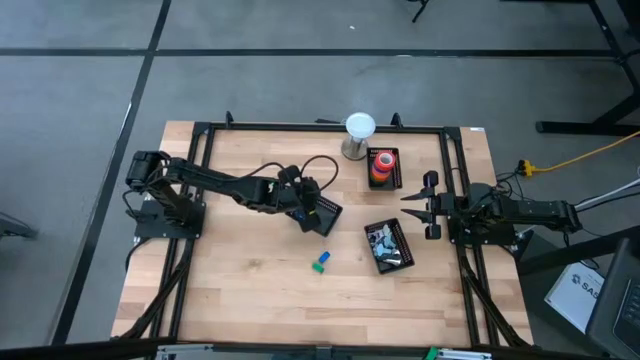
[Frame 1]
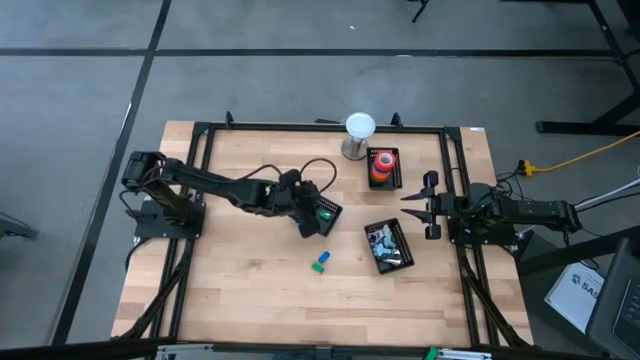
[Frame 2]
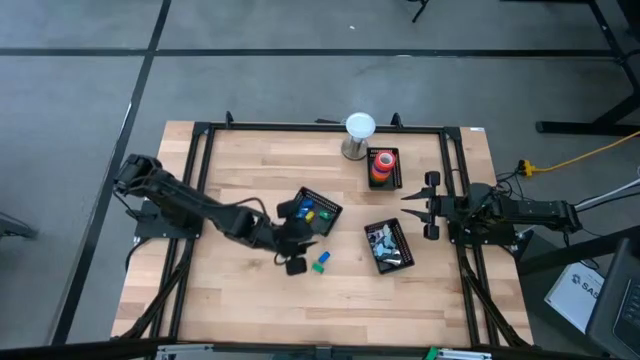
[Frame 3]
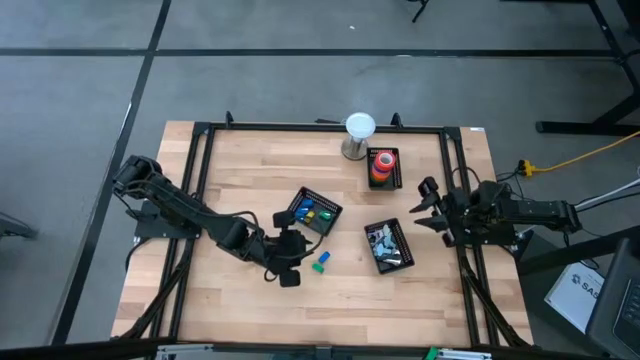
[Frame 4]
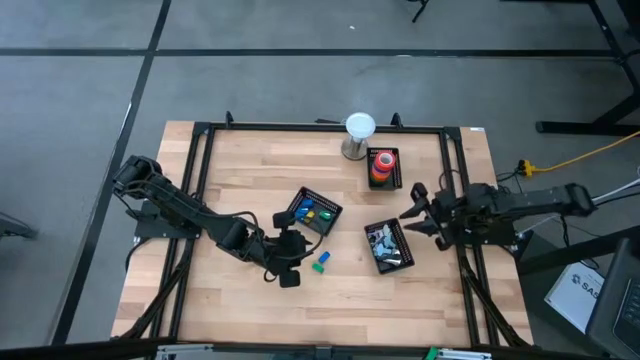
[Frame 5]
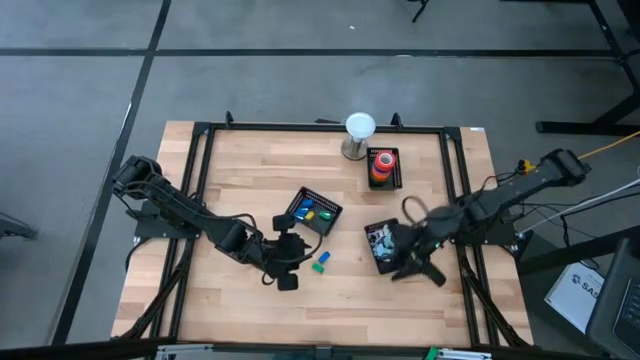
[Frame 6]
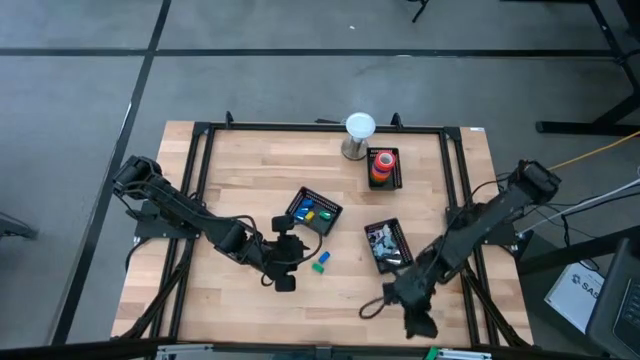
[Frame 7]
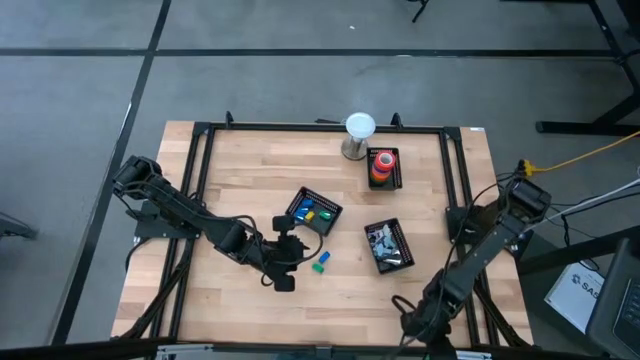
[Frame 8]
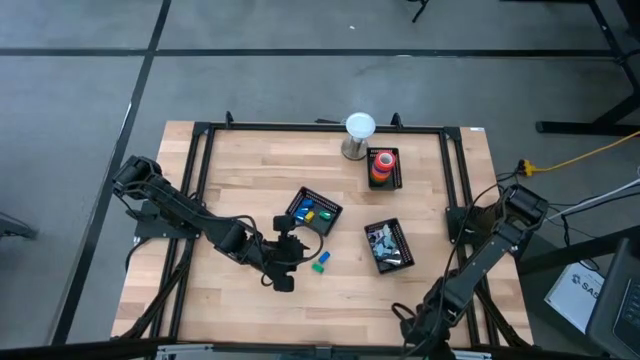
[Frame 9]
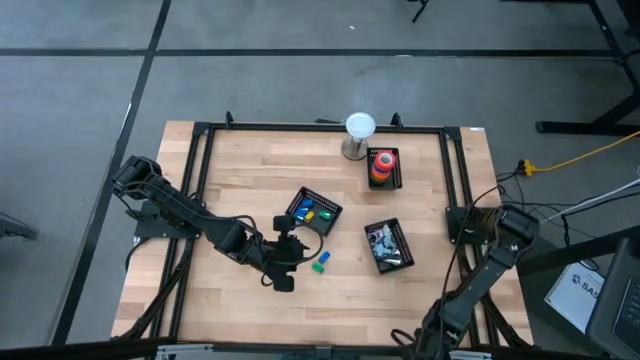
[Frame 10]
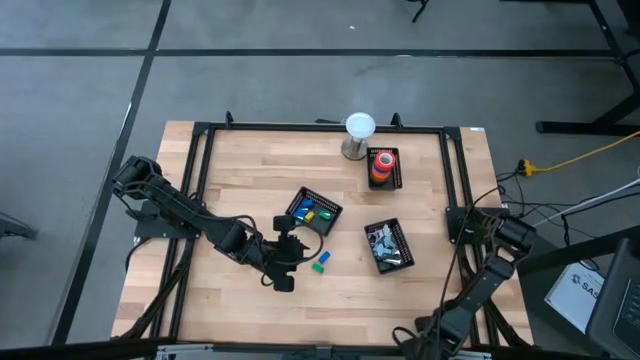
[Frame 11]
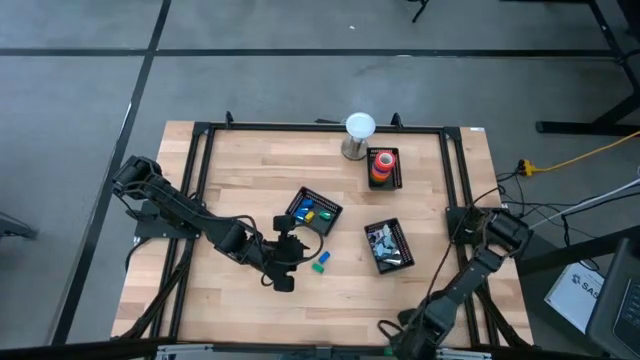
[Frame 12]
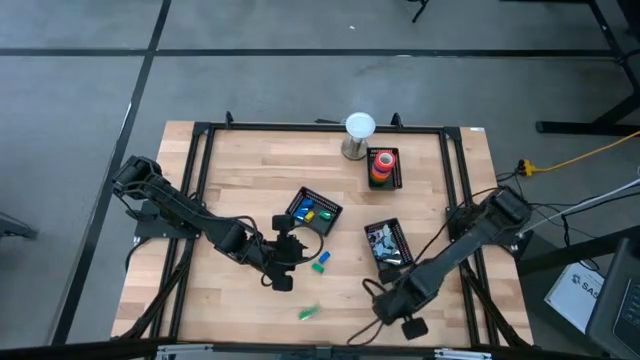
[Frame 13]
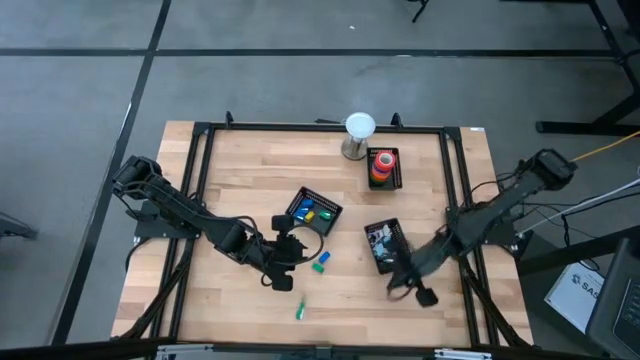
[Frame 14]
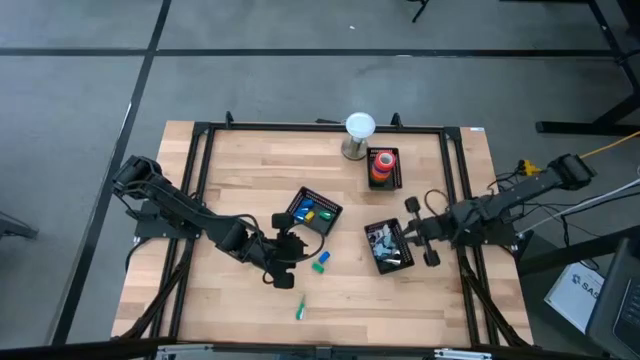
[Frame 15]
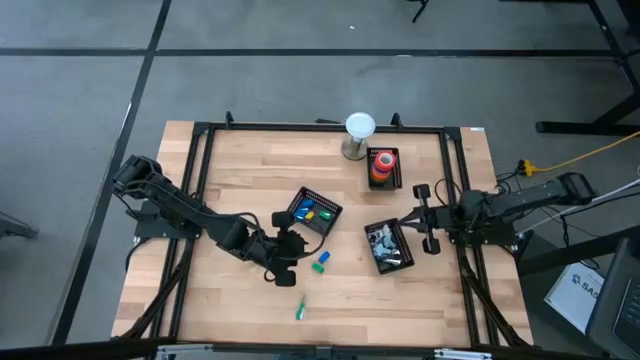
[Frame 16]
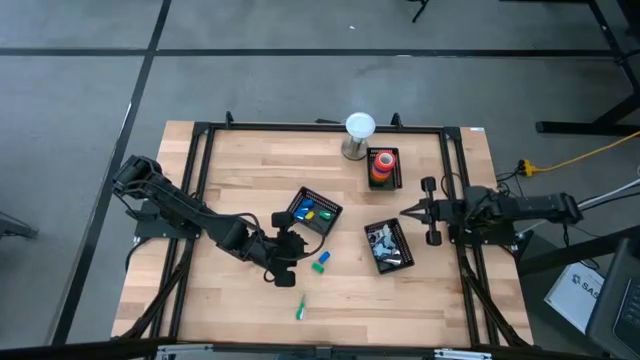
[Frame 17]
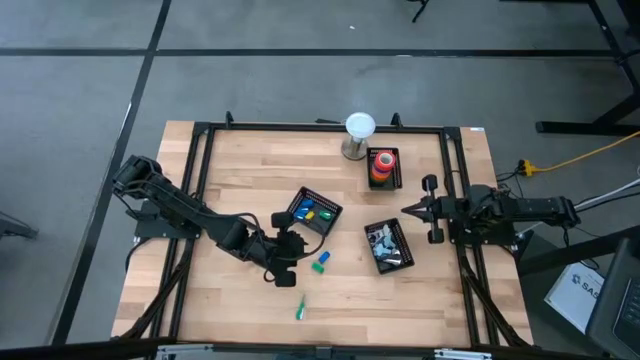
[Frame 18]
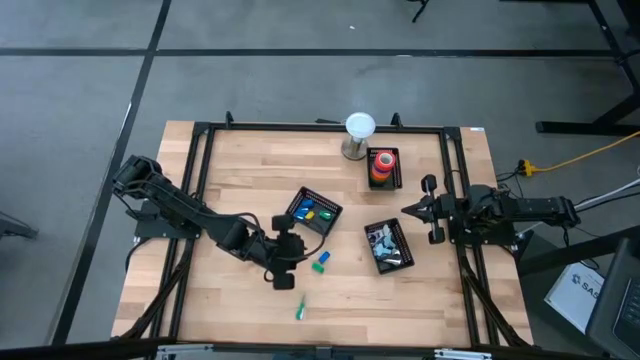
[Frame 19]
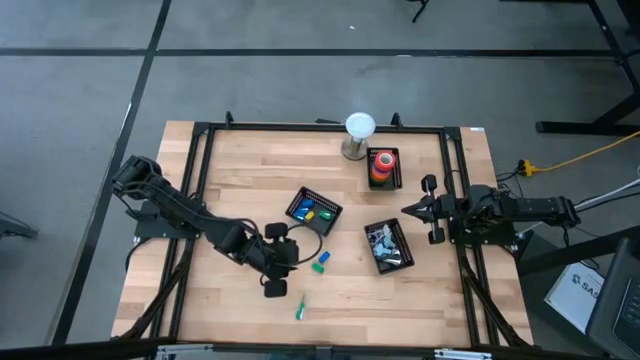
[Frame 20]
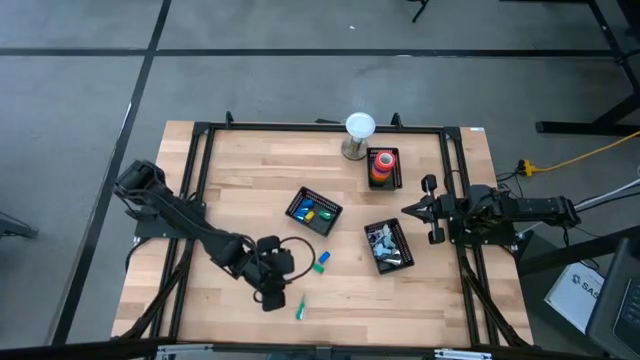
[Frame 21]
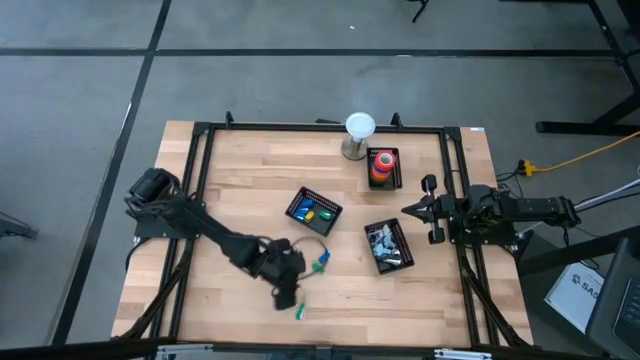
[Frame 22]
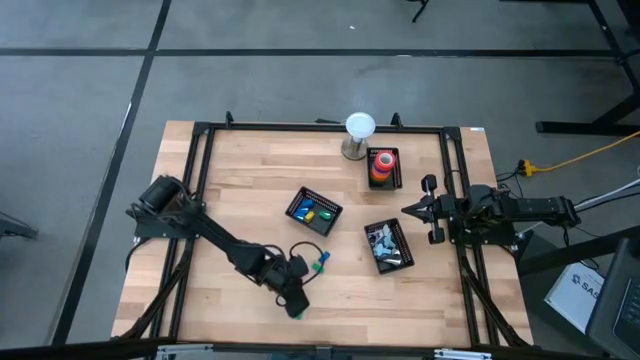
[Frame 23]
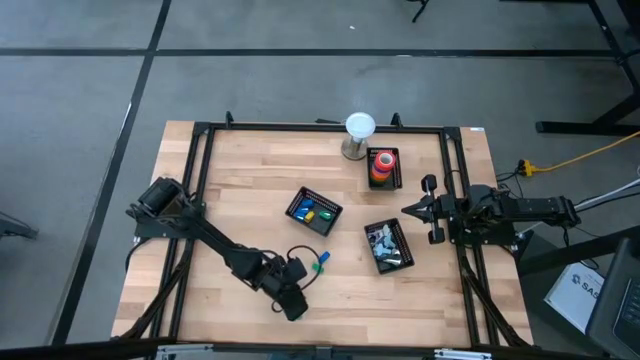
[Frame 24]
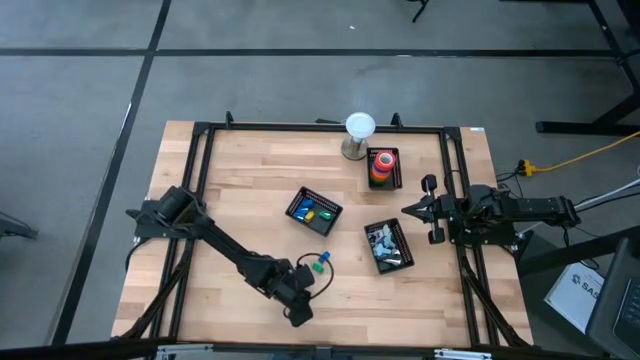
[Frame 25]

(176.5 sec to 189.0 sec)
Task: Pick and place Stapler, Stapler remover, tape
Put the green stapler into the center black bin

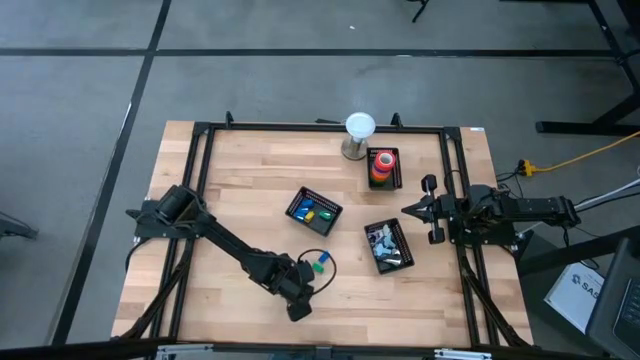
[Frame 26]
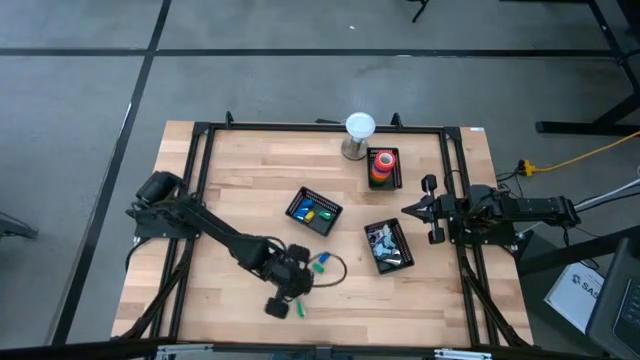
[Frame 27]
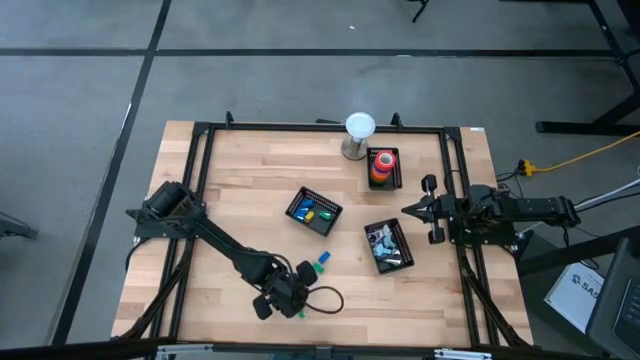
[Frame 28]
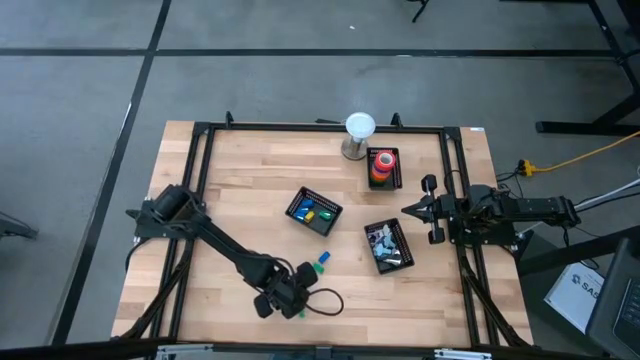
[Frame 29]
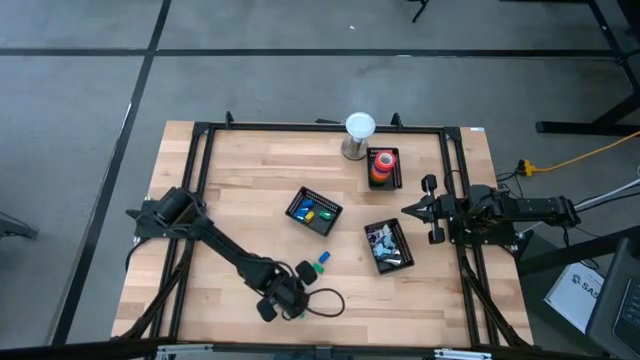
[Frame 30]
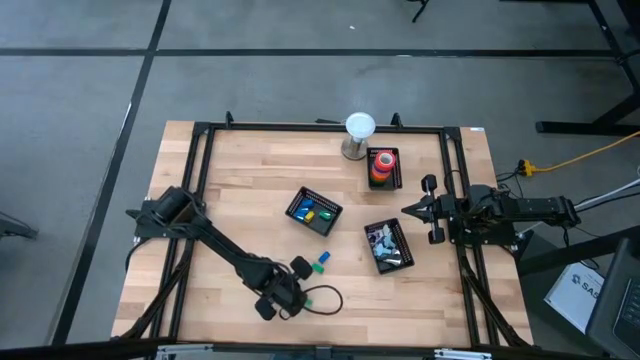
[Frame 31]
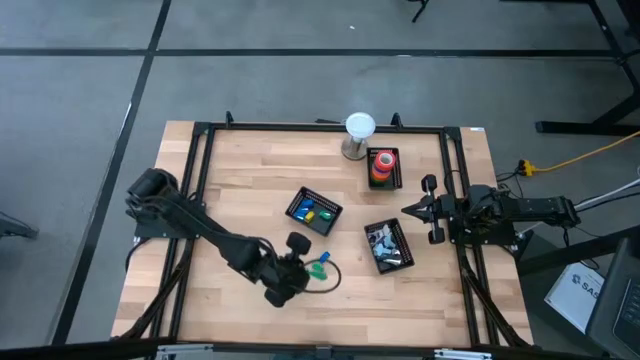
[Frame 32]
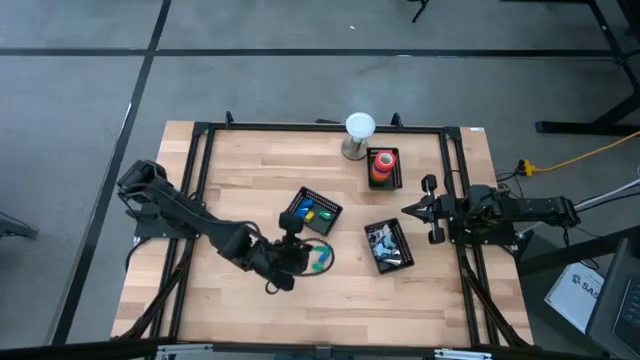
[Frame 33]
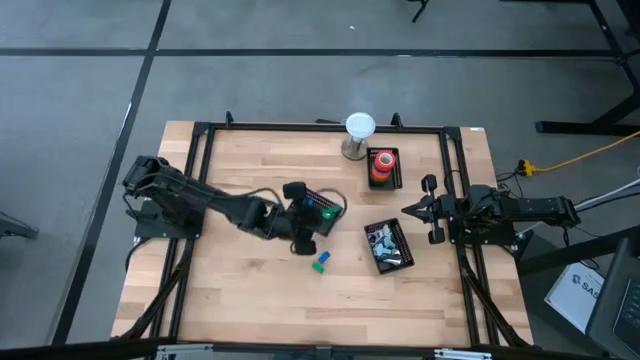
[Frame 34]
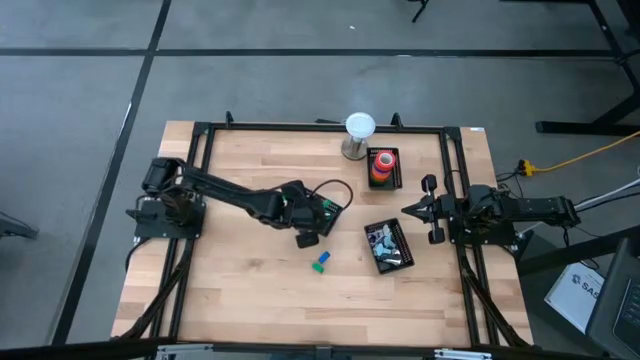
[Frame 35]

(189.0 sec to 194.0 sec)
Put the green stapler into the center black bin

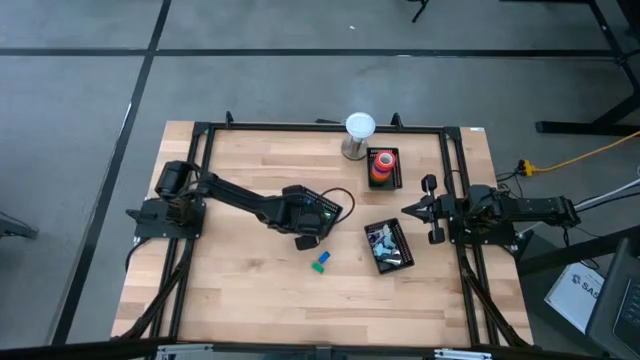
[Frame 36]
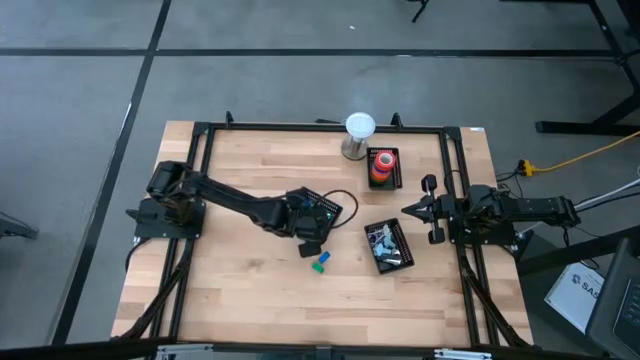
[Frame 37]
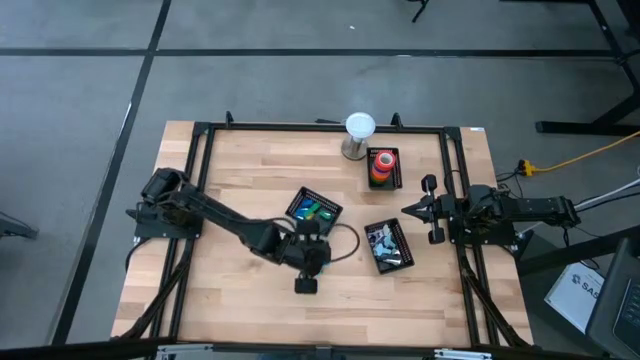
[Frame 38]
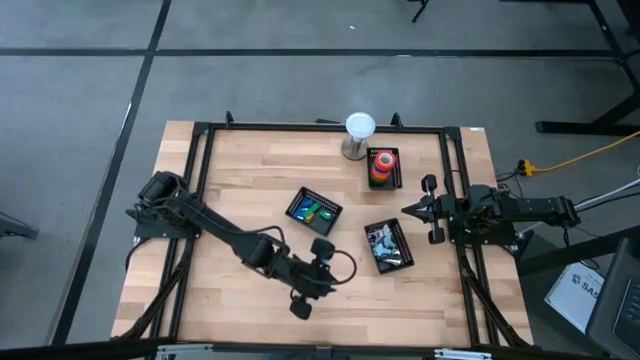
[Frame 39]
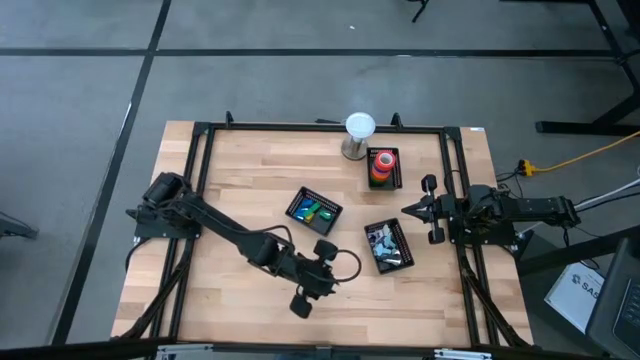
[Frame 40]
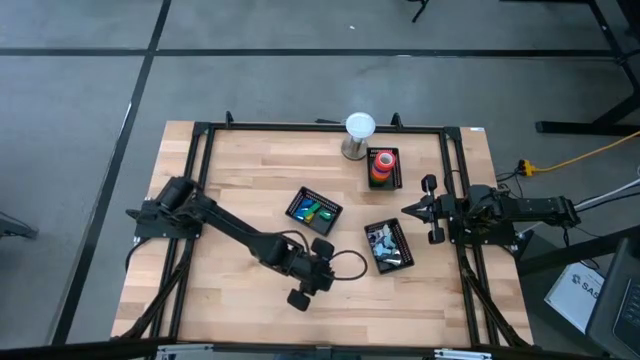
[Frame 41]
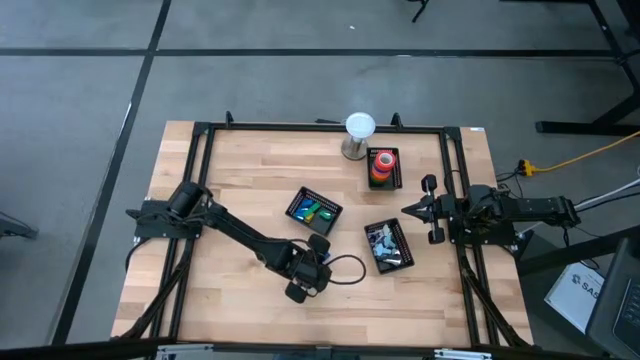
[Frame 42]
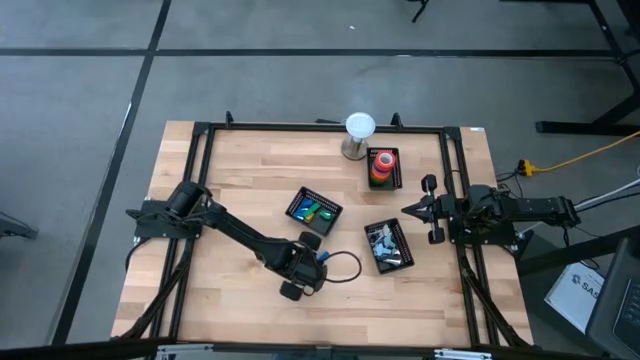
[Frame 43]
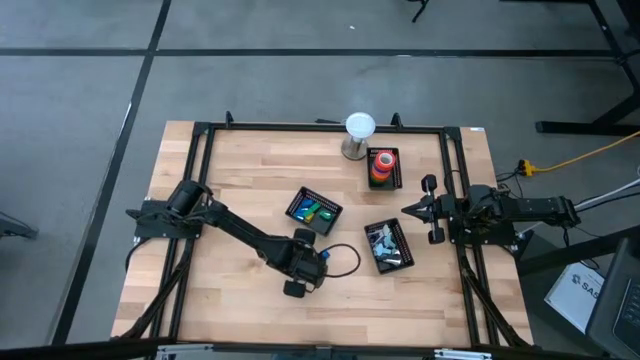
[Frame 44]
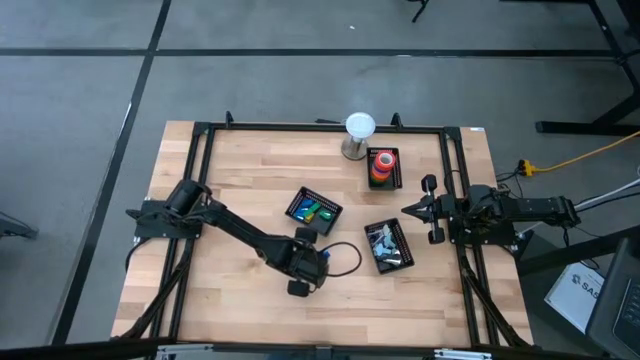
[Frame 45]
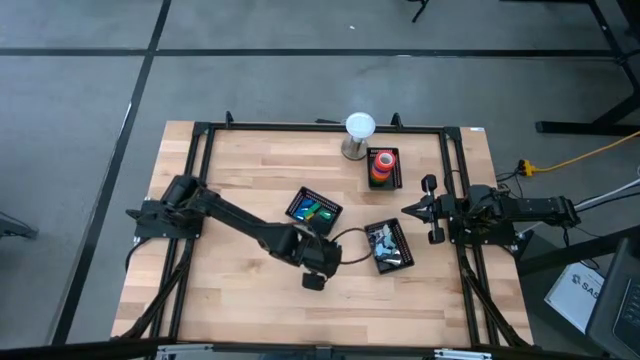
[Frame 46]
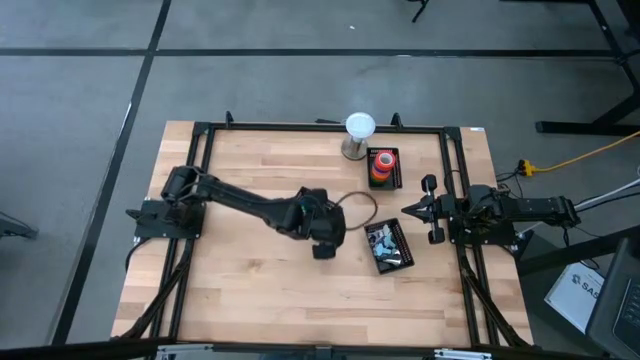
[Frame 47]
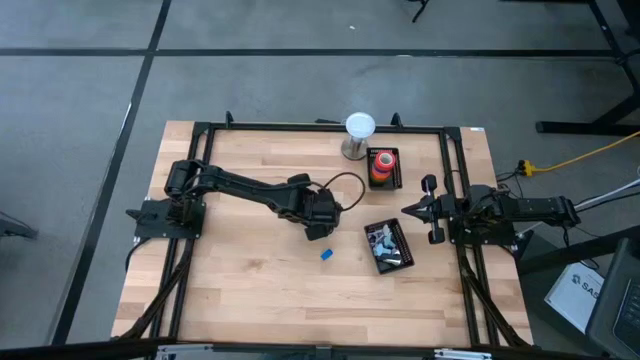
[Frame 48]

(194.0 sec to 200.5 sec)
Put the green stapler into the center black bin
